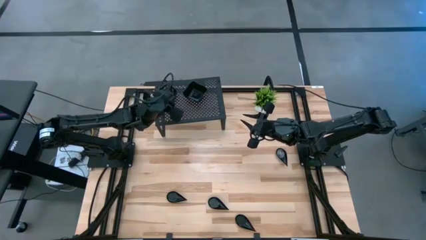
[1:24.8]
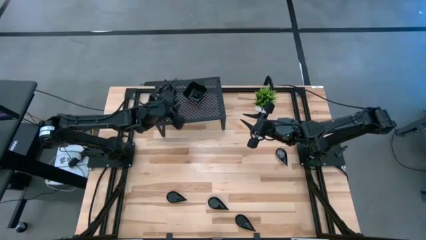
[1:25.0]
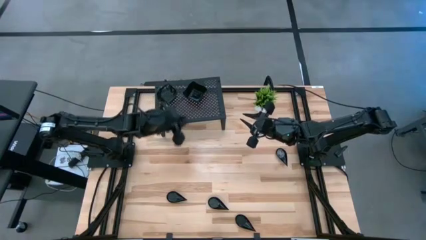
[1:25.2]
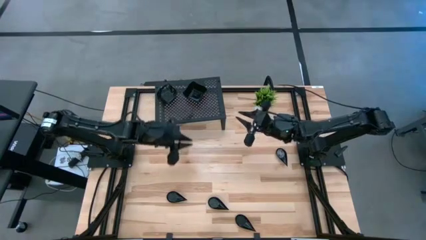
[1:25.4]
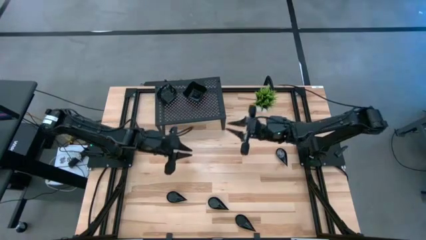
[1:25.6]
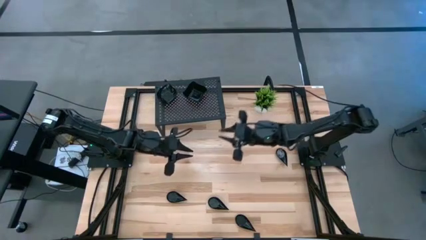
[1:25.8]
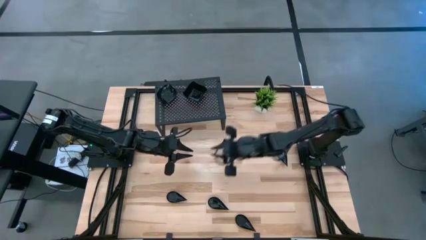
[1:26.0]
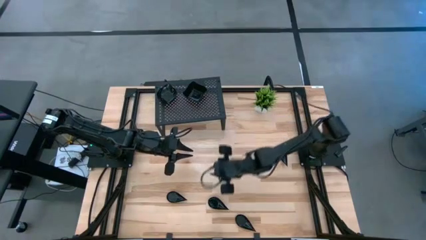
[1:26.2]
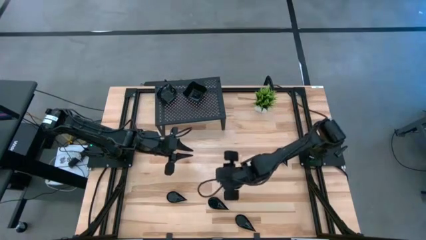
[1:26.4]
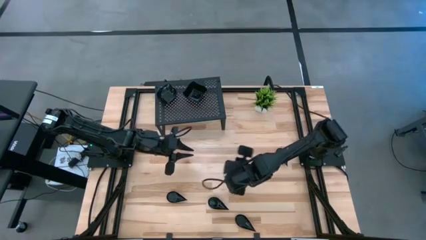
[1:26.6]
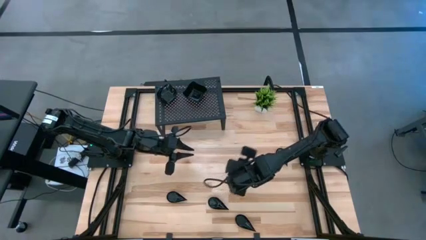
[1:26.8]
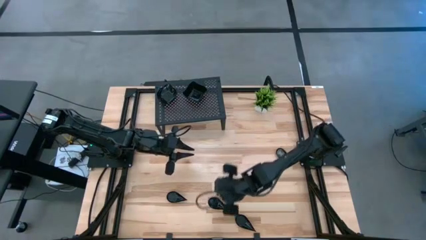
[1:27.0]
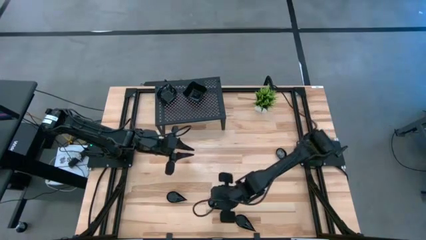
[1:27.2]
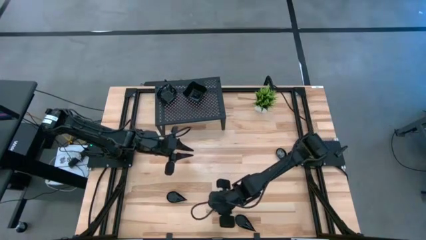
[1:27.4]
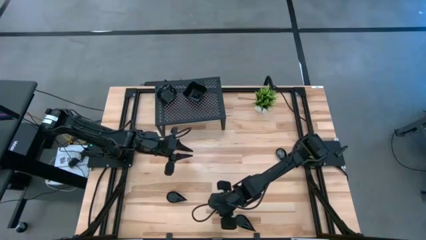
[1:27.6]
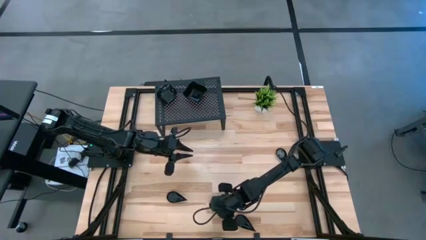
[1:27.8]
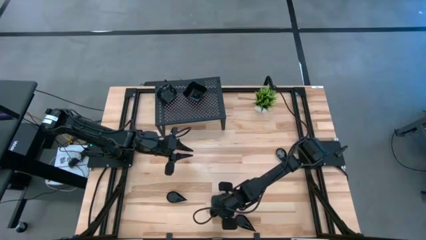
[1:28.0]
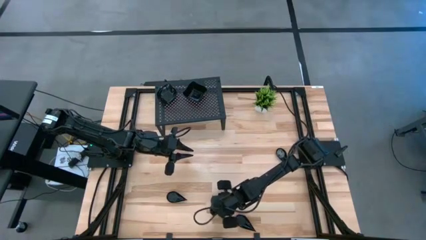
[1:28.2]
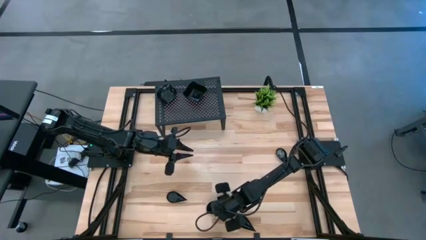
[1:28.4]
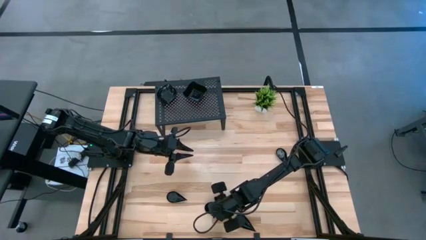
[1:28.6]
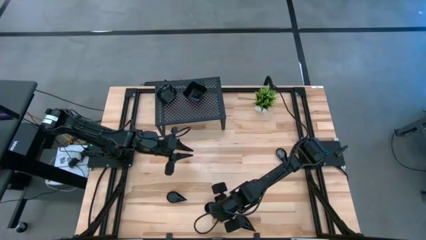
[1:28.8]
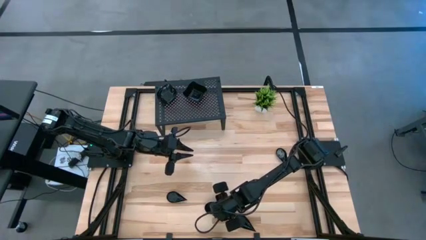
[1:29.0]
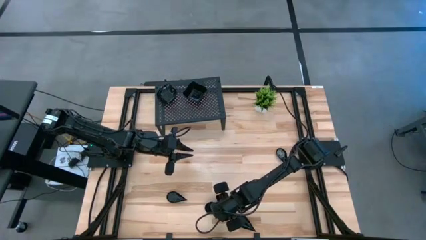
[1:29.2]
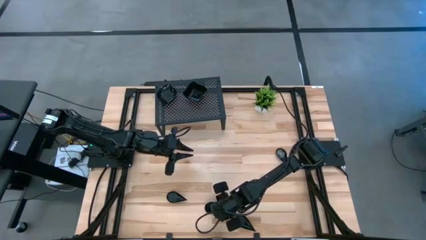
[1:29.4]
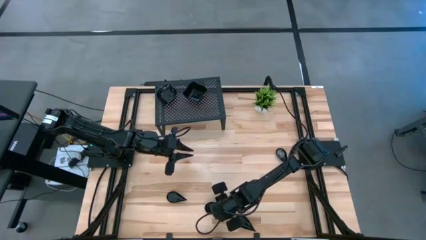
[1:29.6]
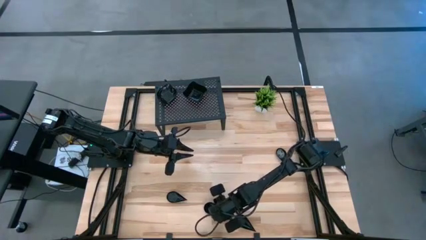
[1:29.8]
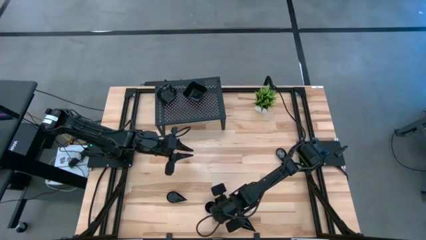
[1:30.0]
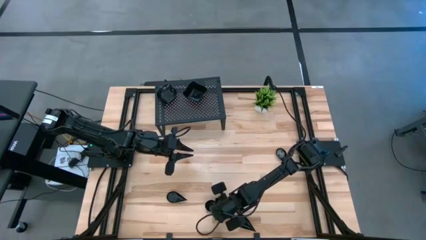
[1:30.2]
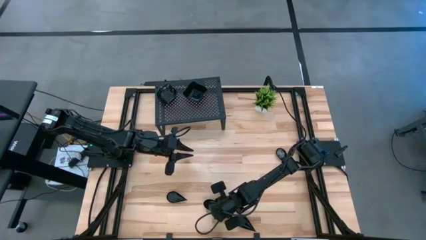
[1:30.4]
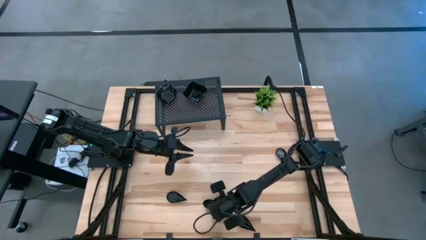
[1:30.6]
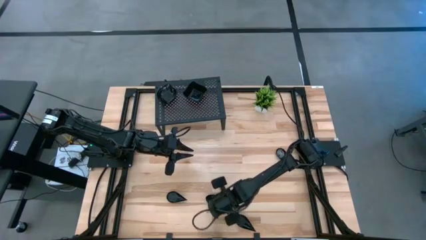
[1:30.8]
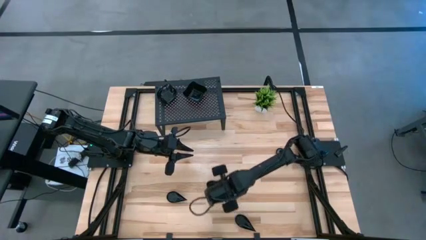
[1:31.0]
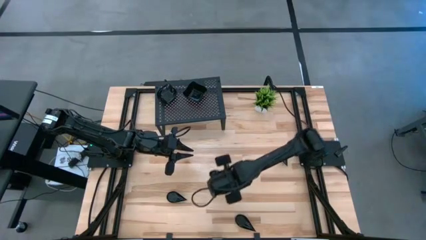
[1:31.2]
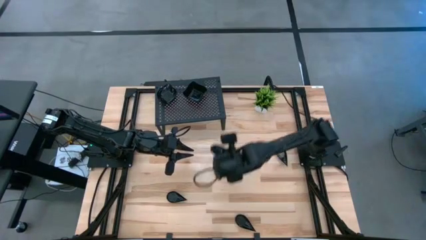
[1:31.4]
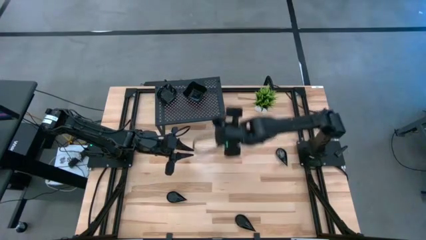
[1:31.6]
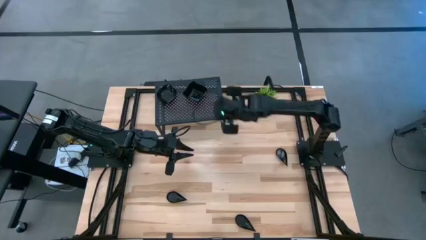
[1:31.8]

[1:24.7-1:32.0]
Task: Pick & Place Mini shaped plates
Put the black drop shaped plate on the shelf
